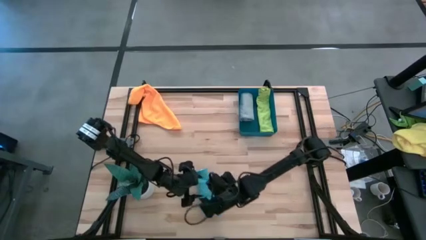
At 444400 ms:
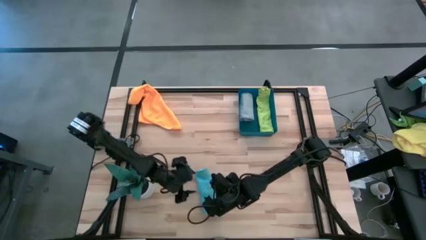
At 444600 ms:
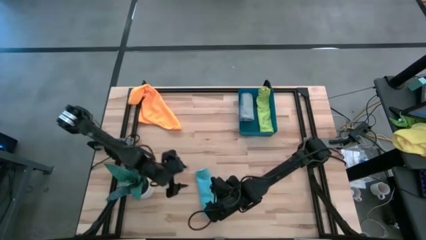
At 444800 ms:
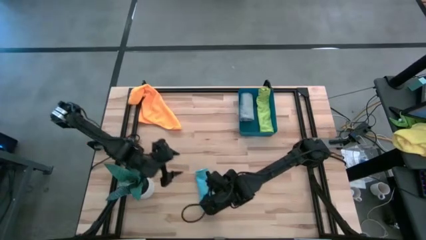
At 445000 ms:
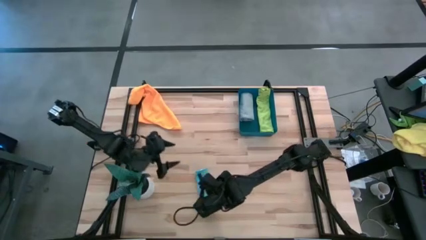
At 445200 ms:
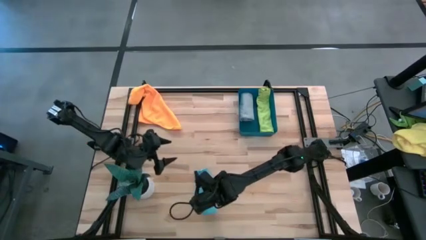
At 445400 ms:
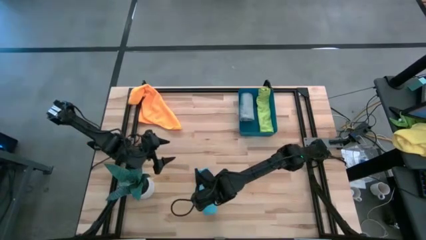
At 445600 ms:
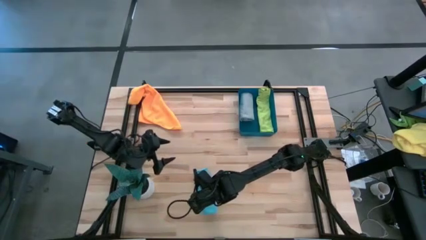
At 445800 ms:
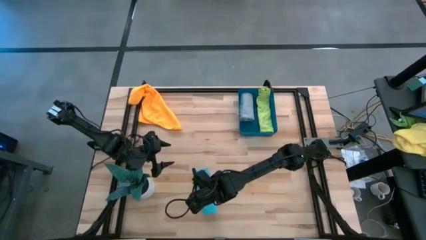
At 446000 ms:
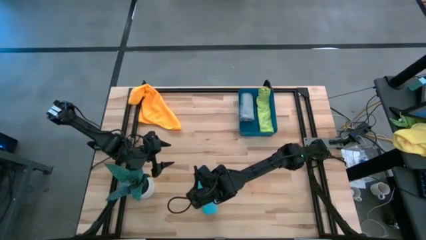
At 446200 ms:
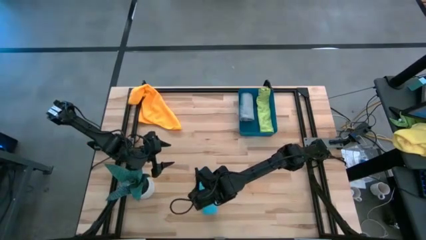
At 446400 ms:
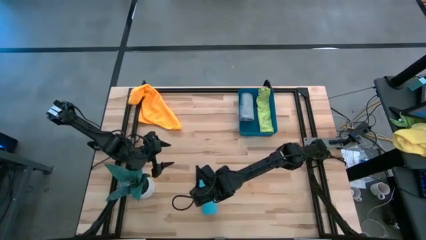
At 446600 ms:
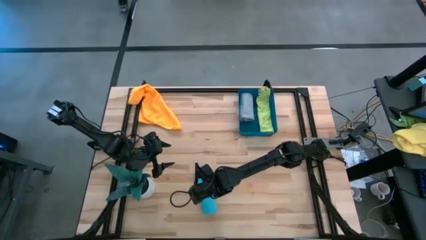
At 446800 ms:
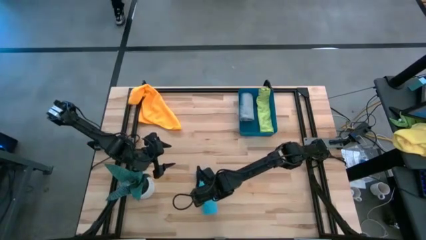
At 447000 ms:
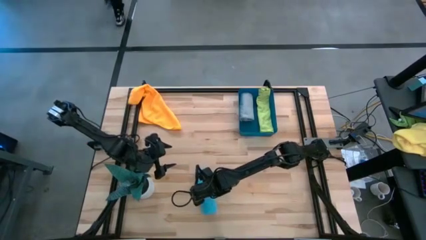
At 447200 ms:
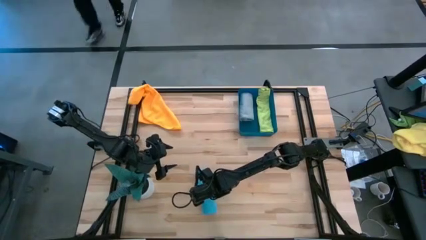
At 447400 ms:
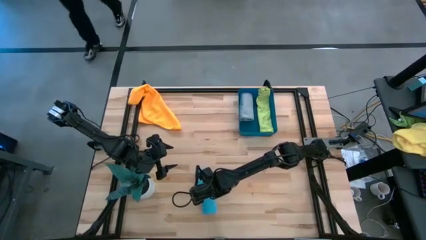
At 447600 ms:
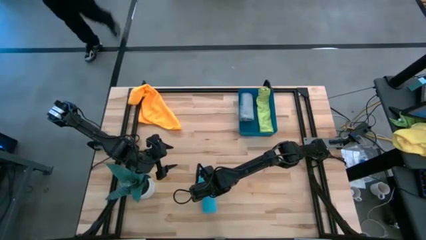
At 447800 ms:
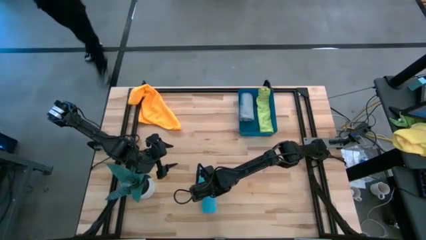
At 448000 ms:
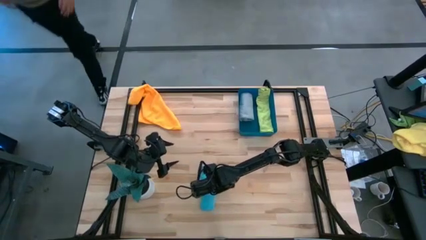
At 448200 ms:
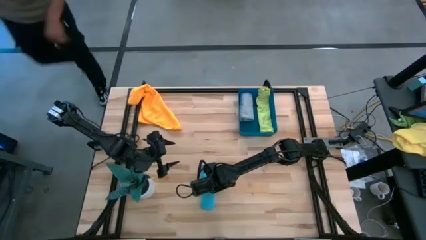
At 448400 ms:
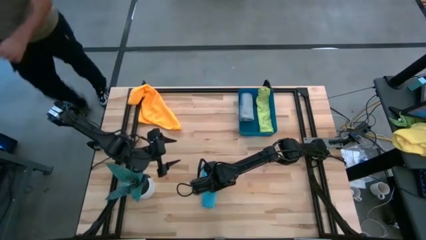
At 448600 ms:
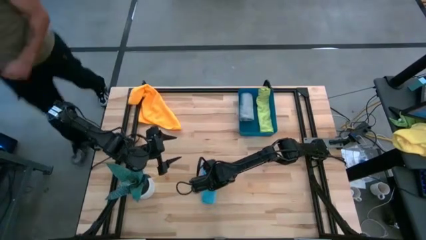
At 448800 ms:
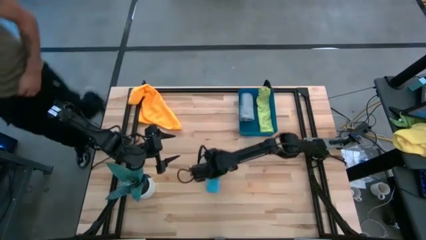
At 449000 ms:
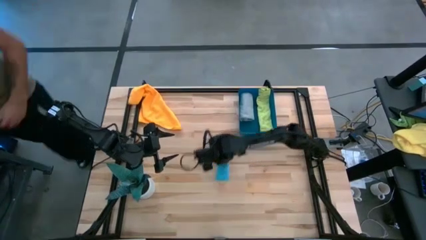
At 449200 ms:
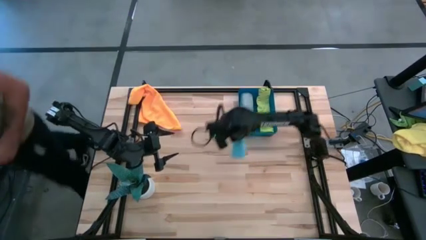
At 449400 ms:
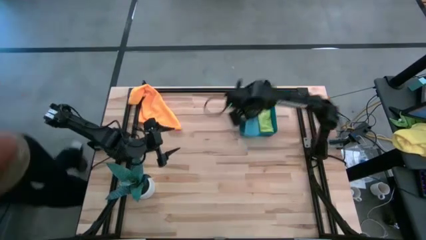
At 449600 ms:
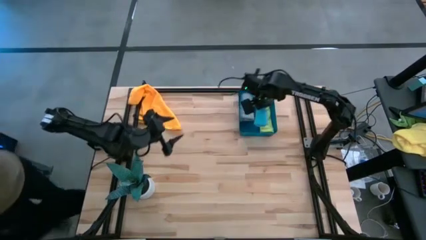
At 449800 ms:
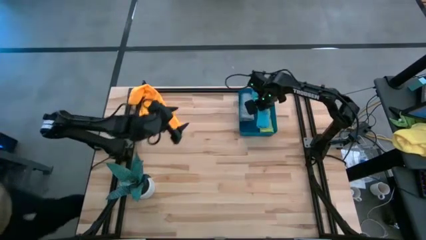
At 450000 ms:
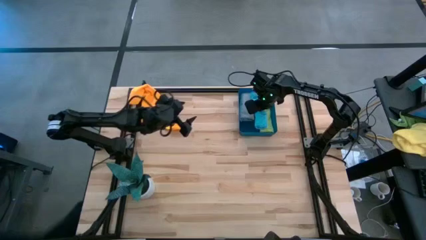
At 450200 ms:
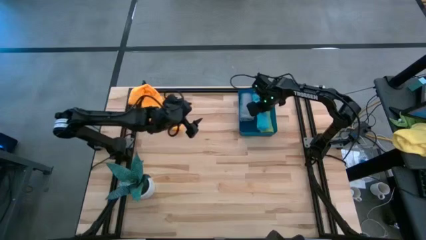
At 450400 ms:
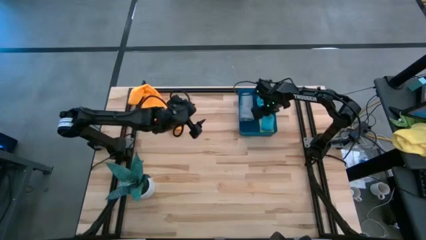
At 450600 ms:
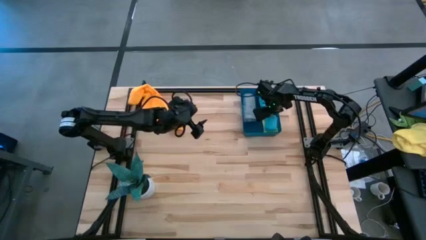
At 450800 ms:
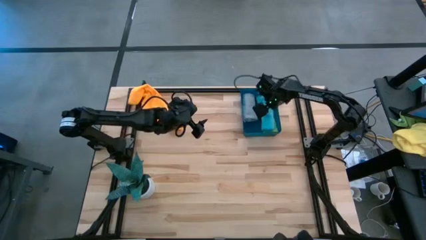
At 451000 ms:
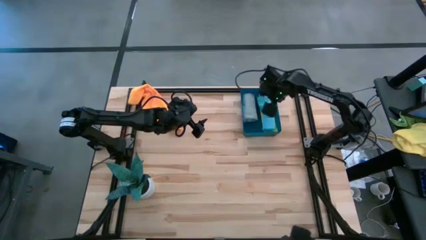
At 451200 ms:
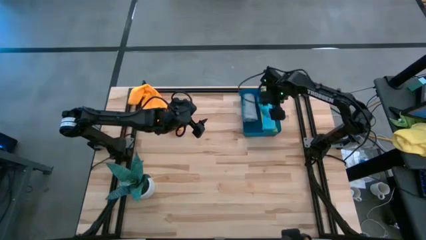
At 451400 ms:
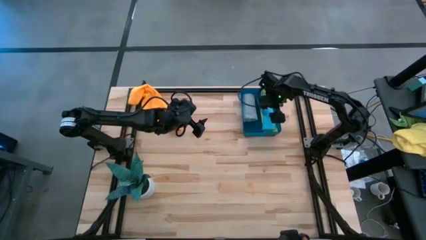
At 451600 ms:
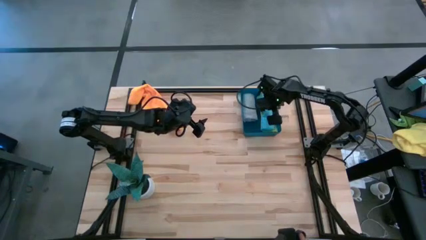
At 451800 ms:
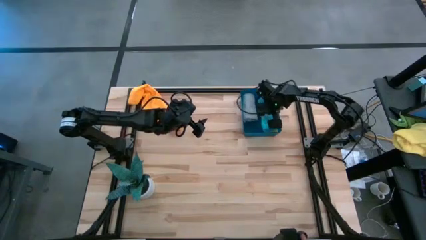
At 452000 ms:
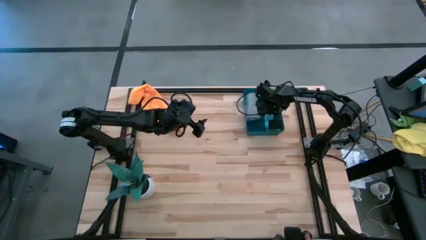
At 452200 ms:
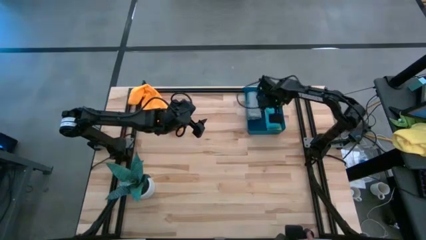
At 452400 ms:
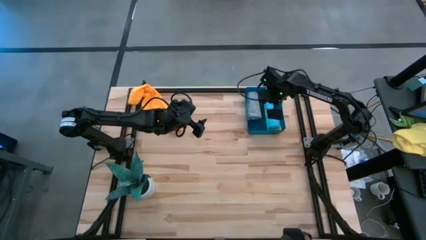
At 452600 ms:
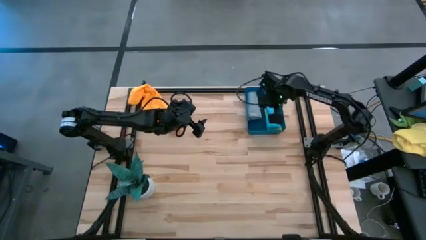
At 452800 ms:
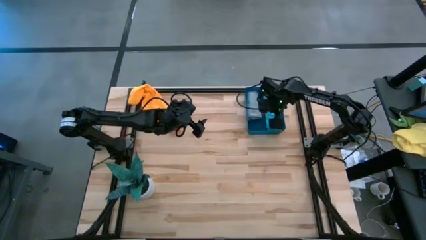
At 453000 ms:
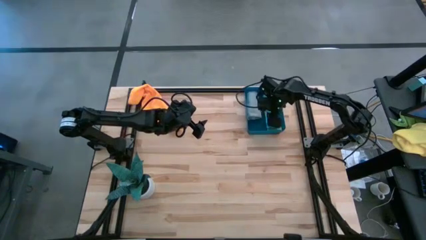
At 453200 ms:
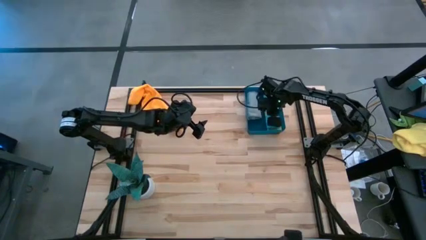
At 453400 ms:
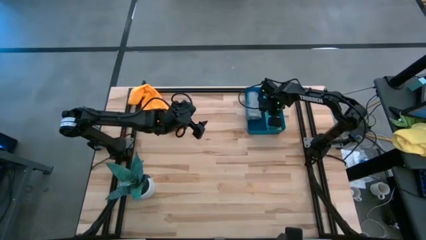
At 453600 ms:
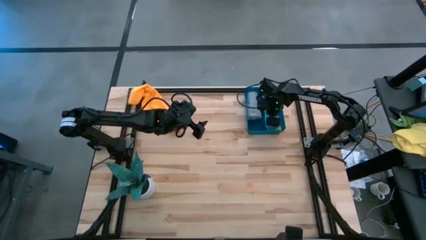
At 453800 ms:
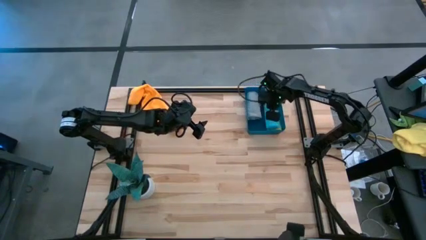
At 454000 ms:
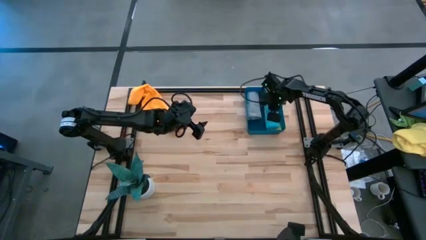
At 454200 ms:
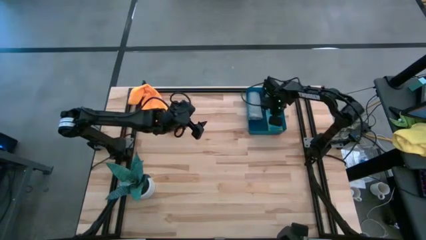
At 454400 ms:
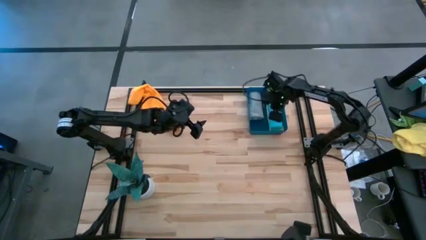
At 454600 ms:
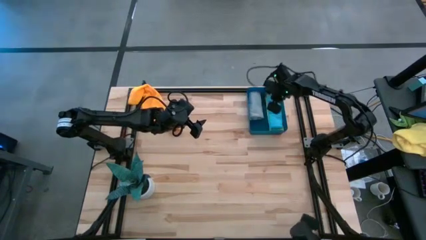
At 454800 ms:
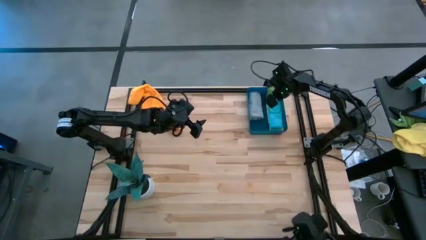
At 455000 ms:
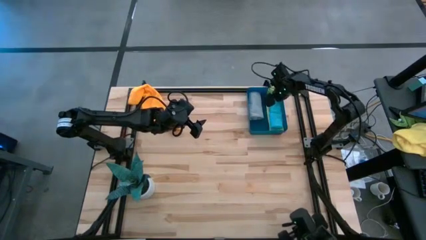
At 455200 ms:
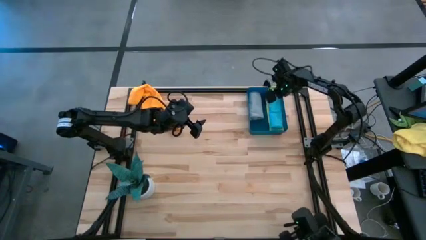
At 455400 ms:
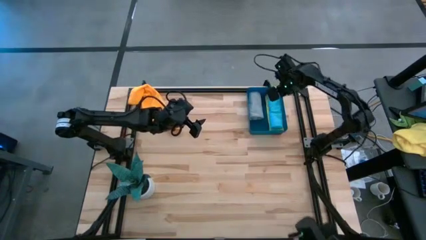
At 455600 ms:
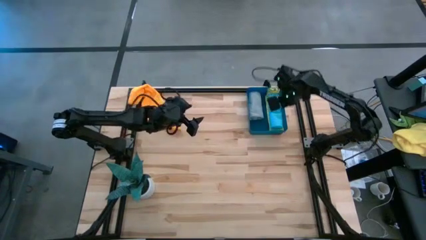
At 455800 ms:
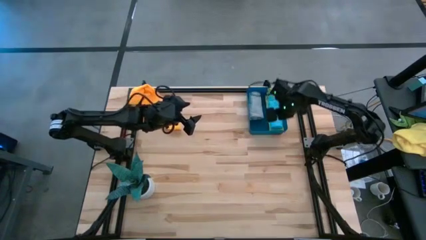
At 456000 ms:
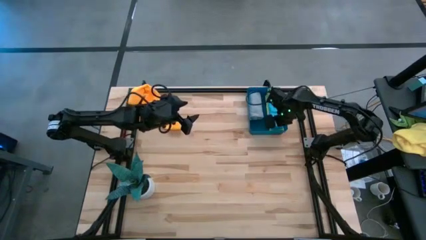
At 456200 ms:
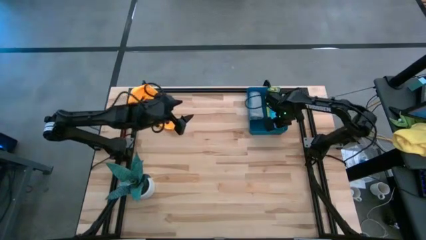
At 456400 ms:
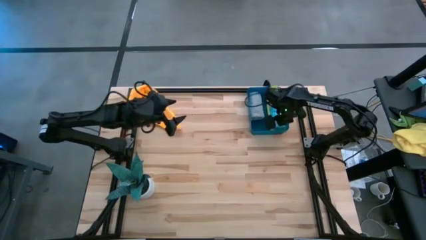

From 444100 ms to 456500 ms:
Task: Roll microfiber towels into tight, uniform cylinder then place into a basket
Stack the blue towel on the green towel in the blue bin

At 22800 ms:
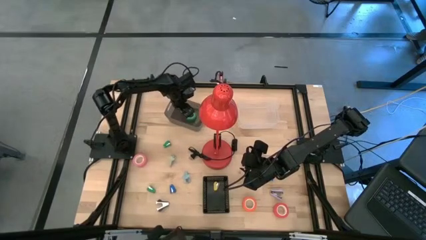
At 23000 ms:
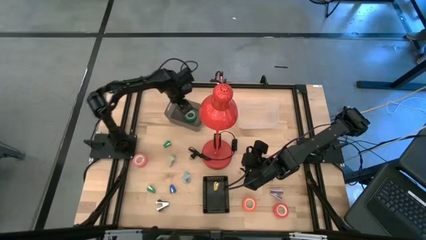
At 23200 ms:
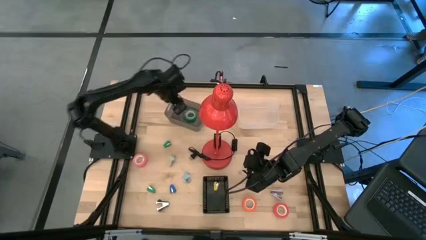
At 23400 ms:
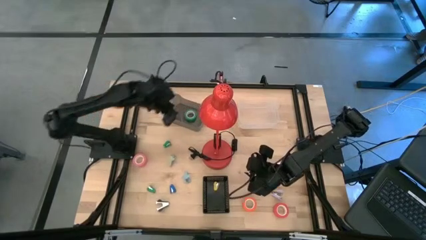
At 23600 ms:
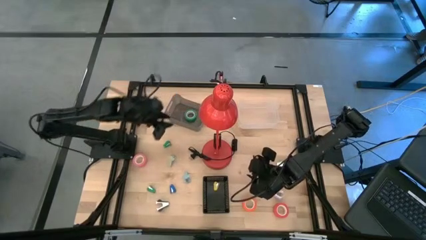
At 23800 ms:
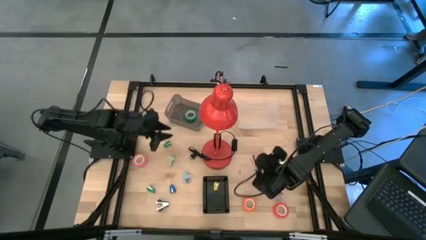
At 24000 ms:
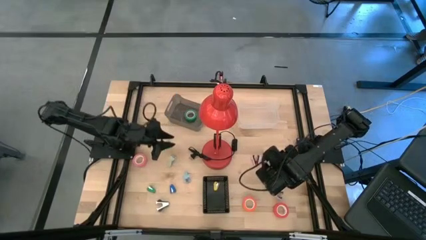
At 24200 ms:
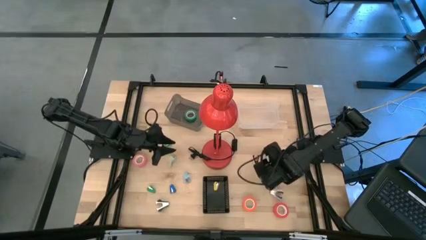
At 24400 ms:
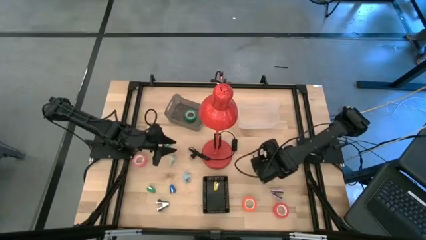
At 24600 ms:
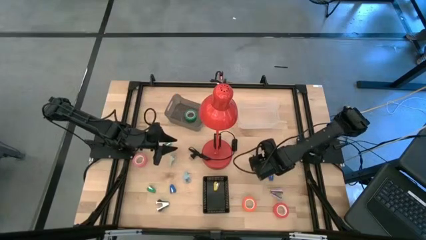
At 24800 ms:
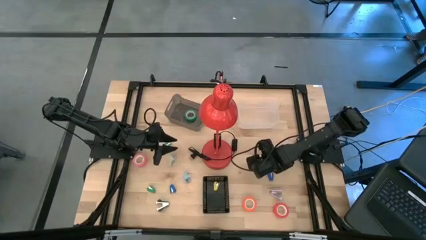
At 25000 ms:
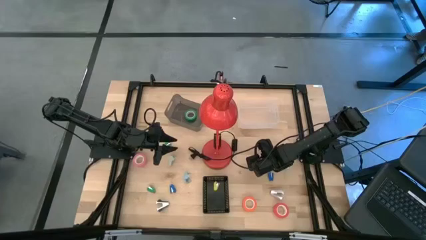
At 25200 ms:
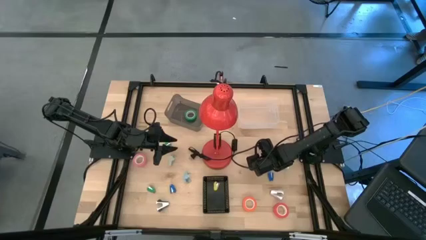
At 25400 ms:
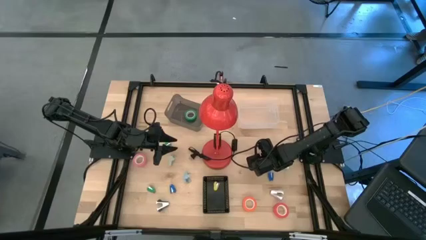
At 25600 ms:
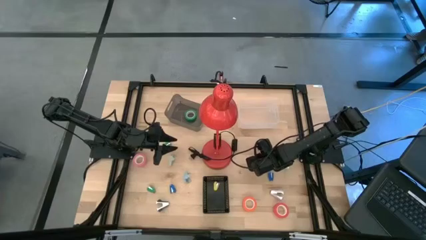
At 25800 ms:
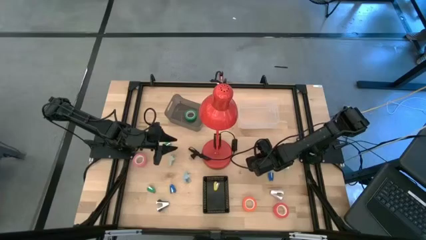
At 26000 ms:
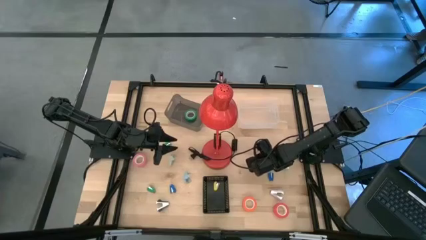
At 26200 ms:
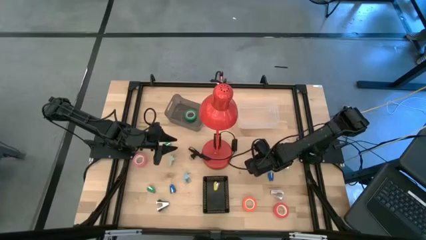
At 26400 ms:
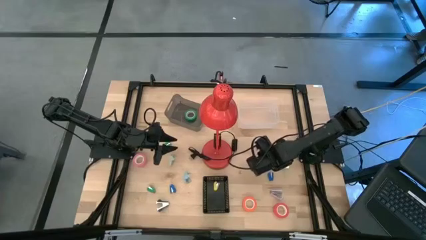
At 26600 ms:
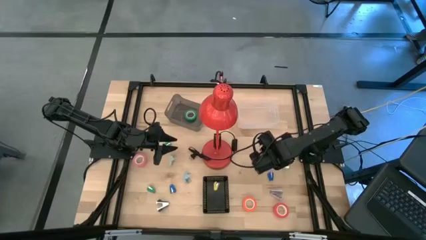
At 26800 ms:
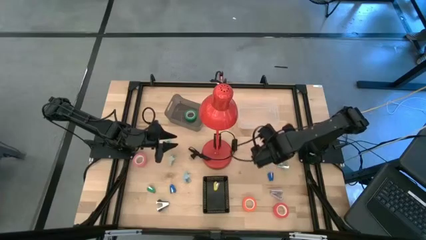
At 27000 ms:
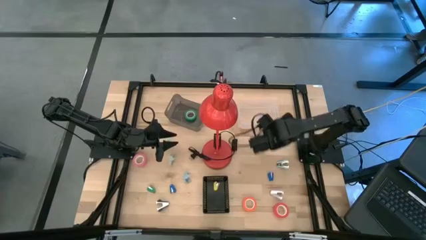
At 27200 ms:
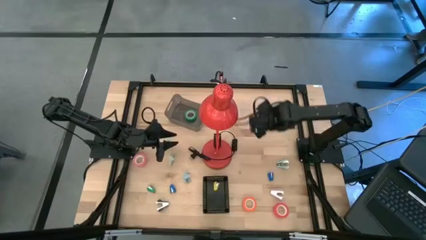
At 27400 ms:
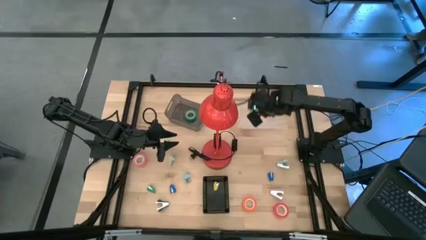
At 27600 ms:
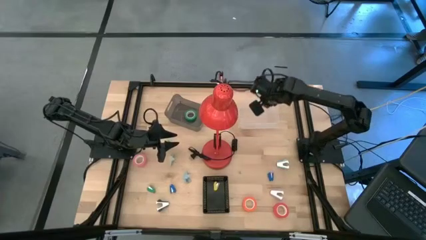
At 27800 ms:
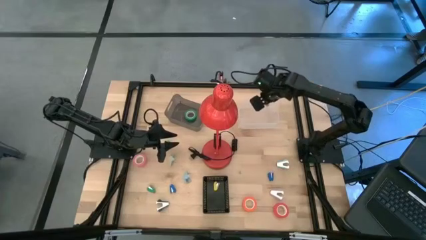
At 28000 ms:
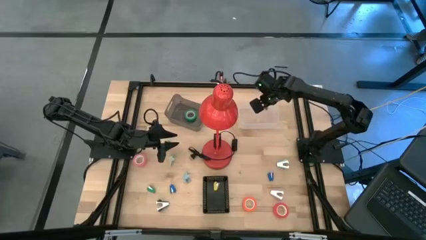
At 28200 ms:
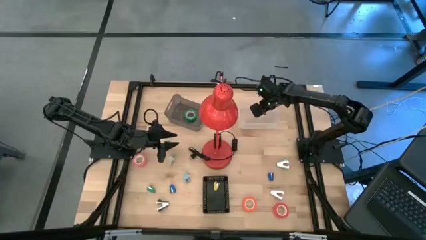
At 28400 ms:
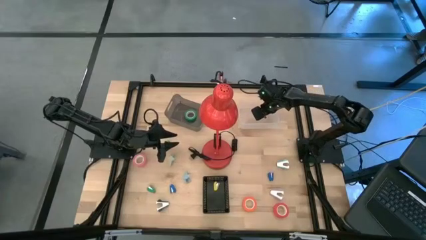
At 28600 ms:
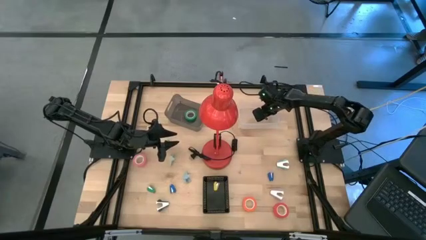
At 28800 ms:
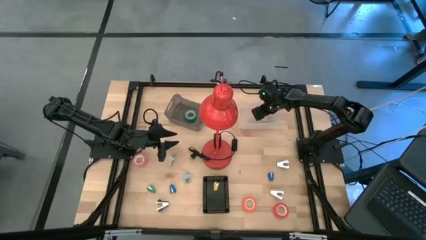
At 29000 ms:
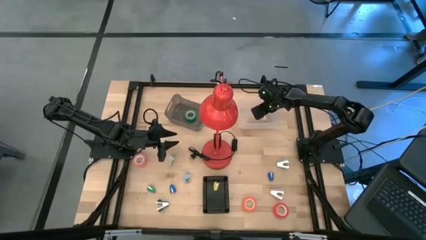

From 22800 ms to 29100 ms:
Task: Pick and place Stapler, Stapler remover, tape
Put the pink staple remover into the transparent bin
